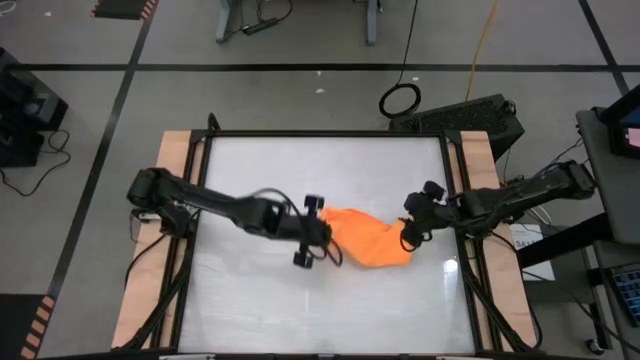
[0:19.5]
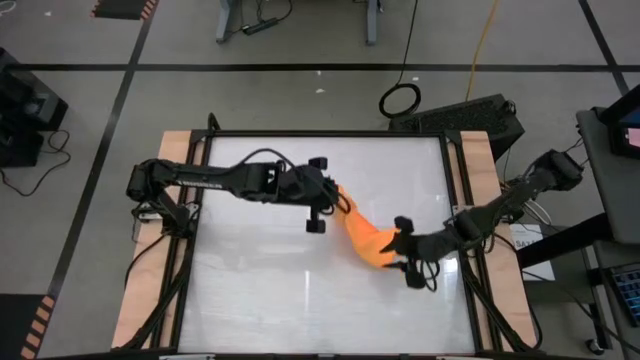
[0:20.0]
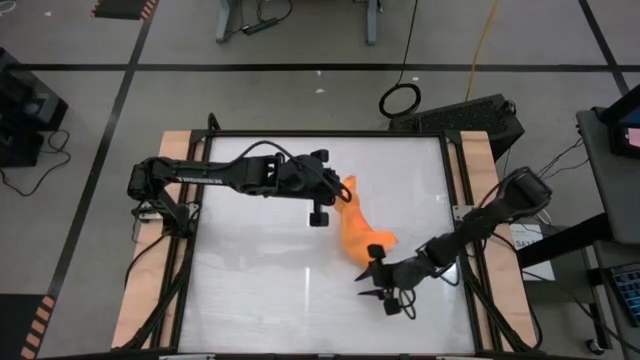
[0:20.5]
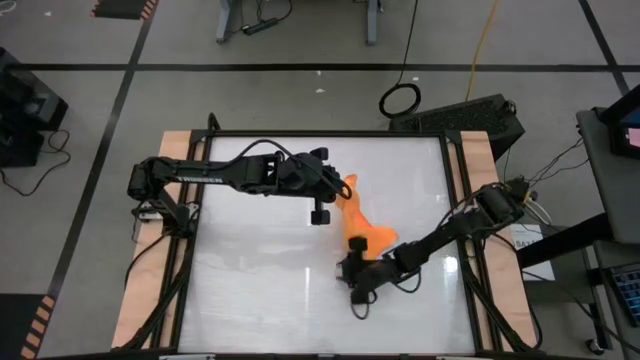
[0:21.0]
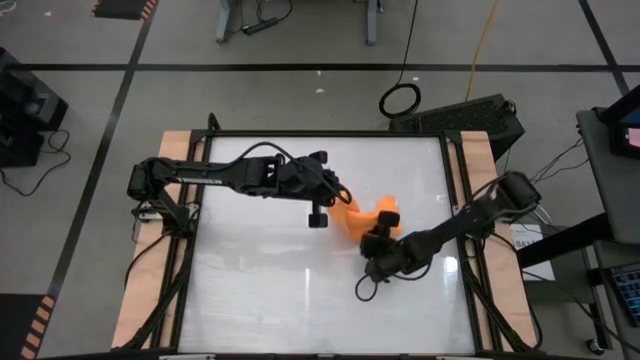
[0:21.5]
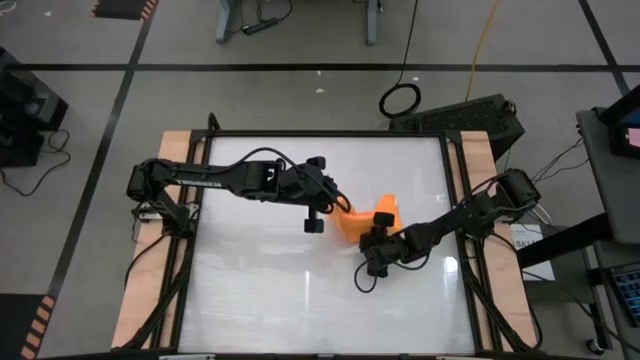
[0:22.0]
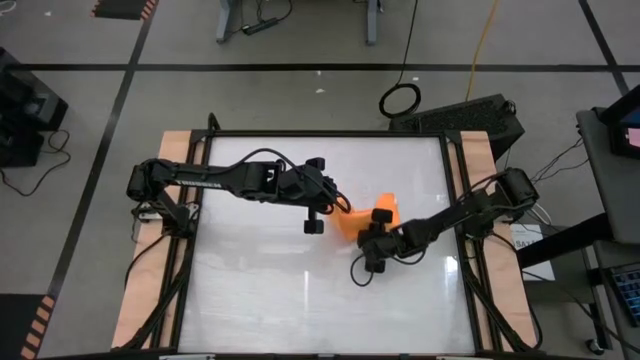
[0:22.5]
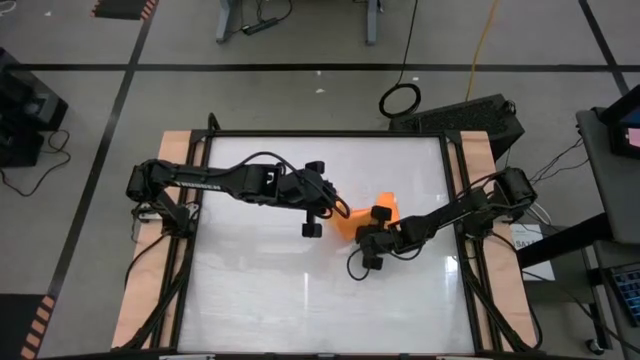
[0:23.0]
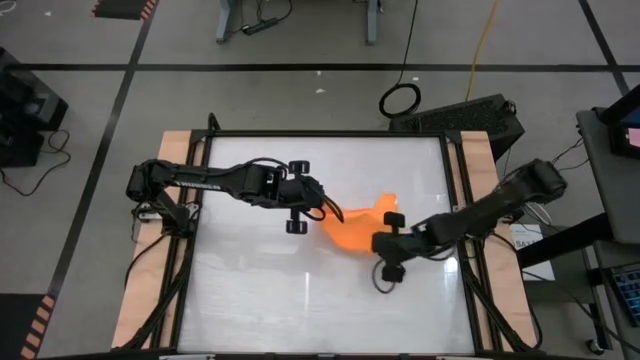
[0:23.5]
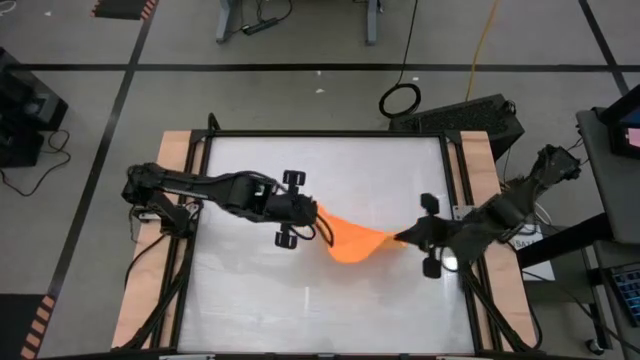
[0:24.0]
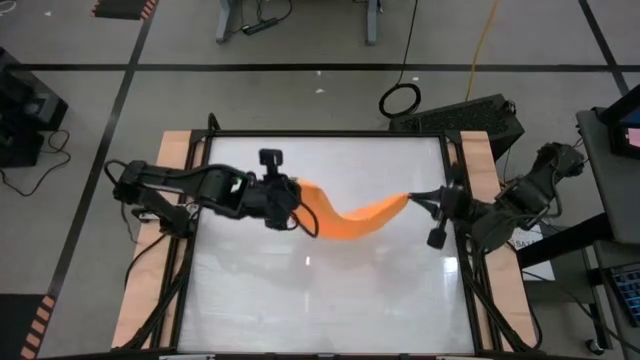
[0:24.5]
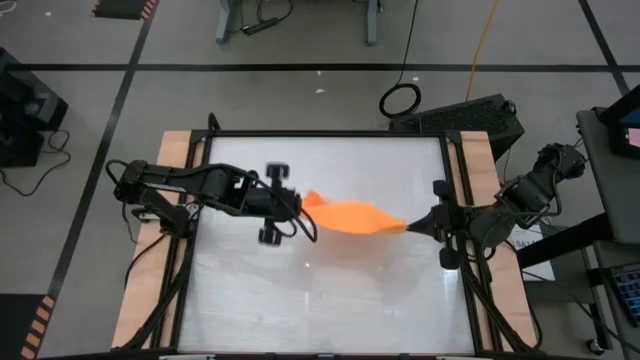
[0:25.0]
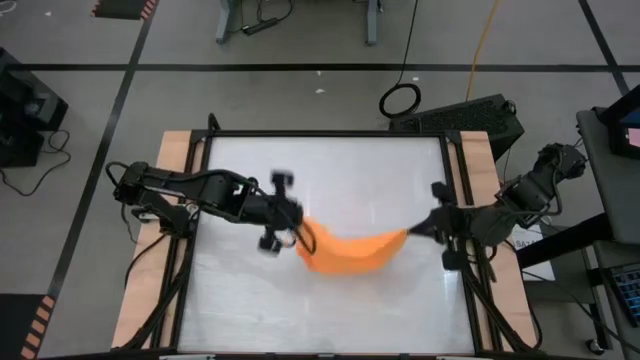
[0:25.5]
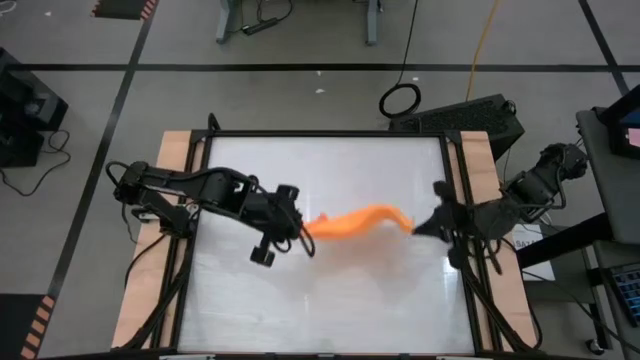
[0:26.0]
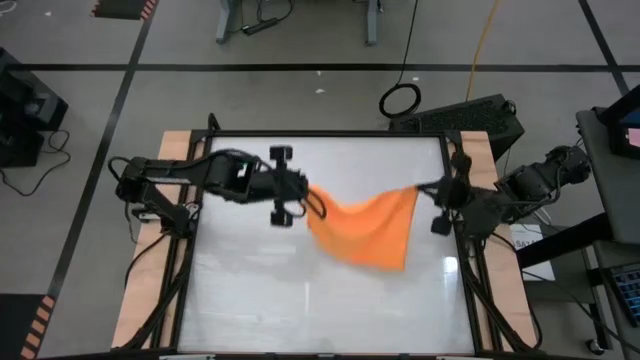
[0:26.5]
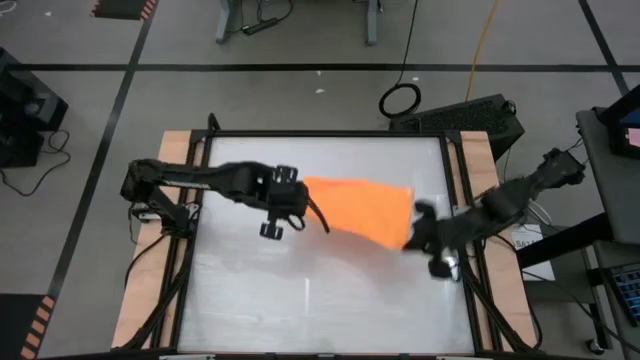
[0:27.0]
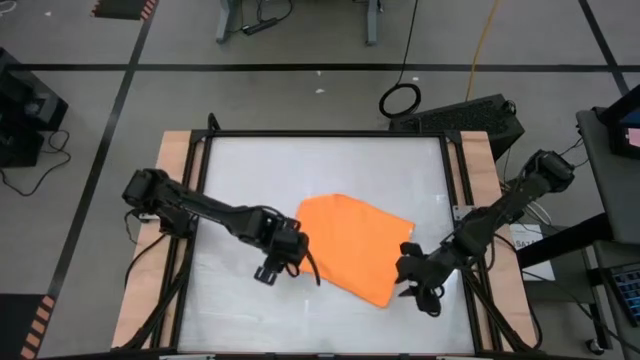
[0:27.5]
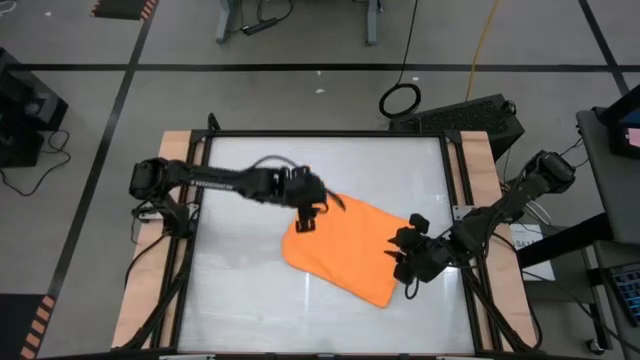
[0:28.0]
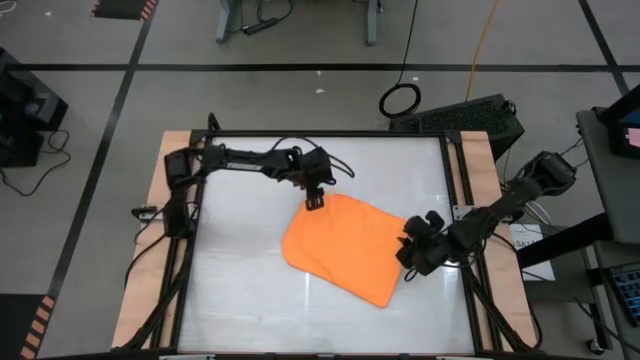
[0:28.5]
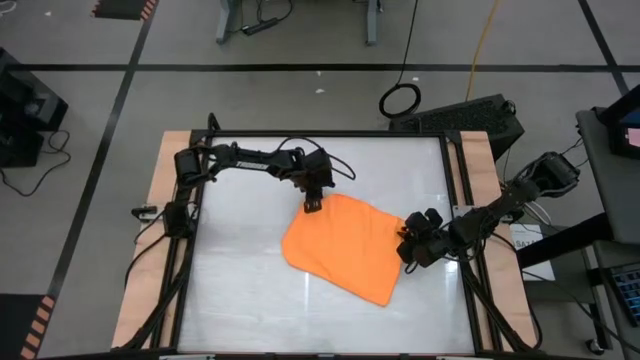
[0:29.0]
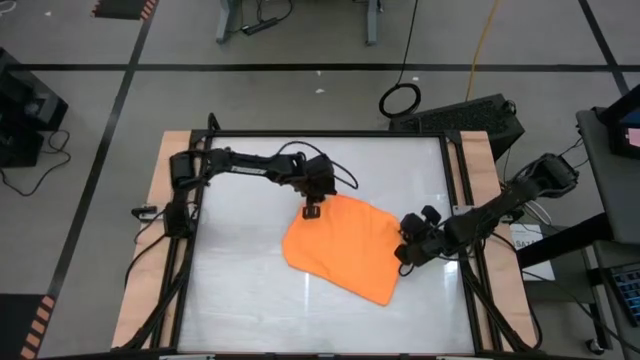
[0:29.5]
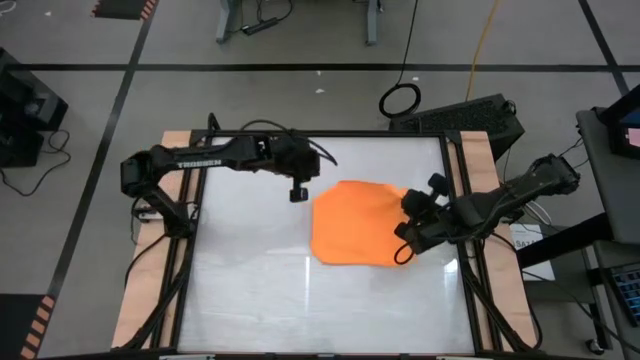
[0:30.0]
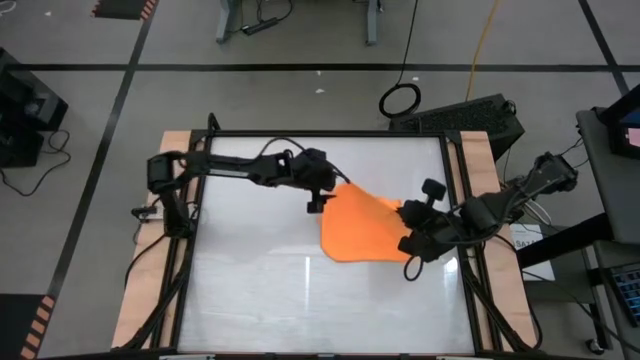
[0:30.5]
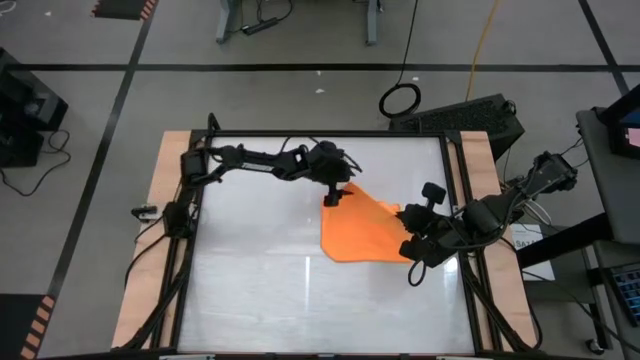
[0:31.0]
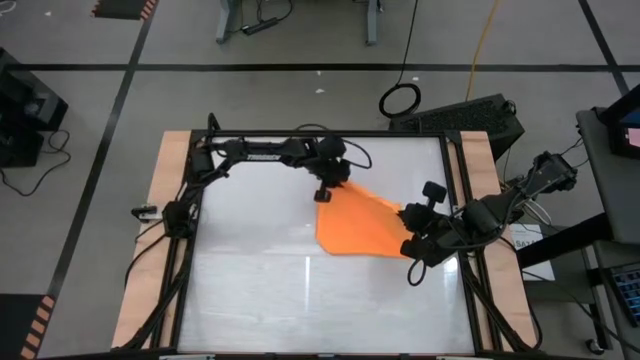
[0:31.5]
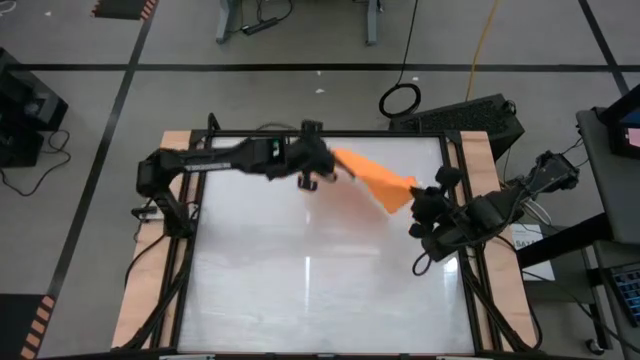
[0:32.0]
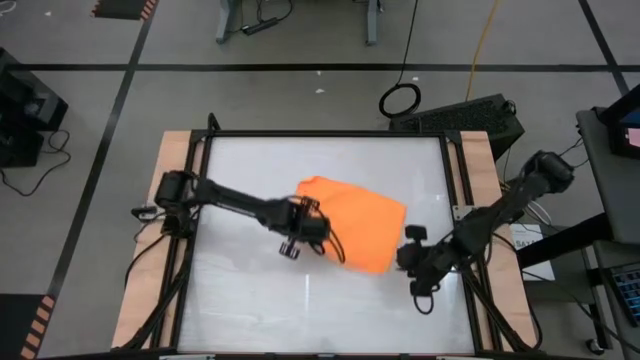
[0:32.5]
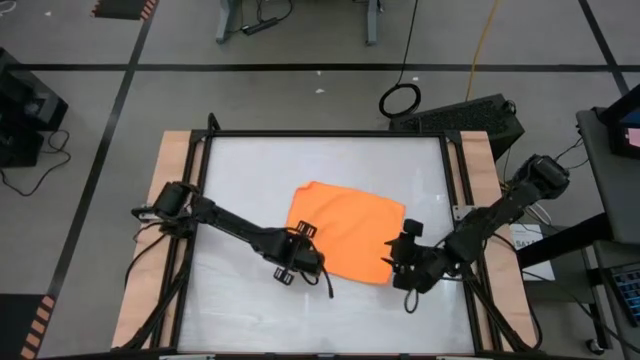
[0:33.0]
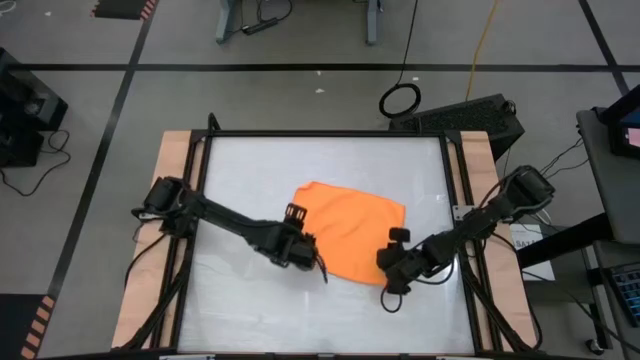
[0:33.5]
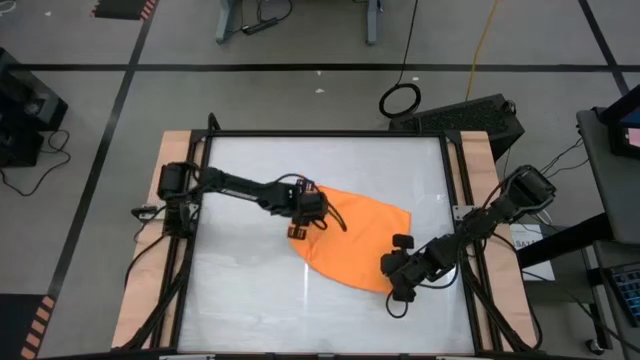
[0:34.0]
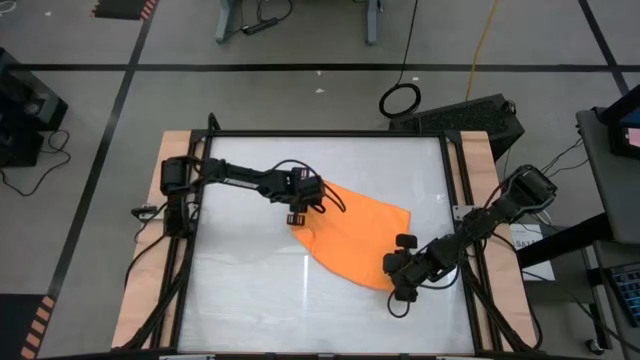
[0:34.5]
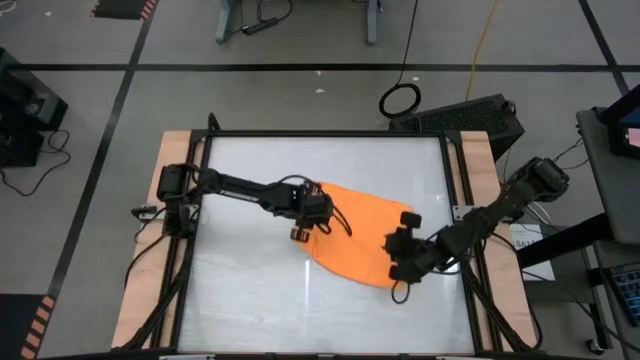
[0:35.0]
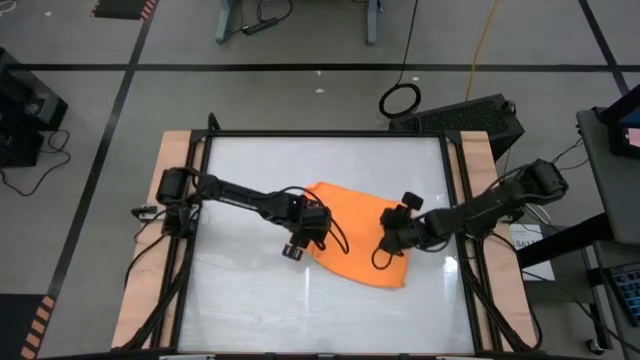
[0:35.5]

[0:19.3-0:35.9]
Task: Roll towel
Fold the towel

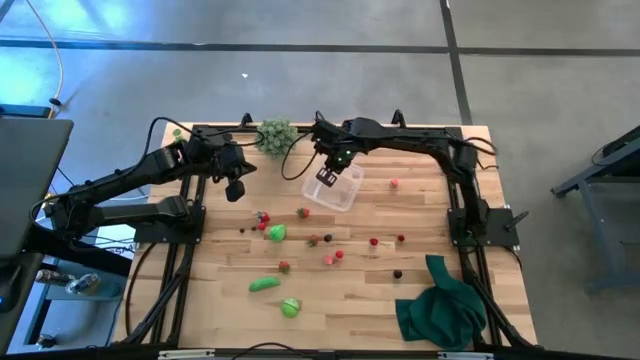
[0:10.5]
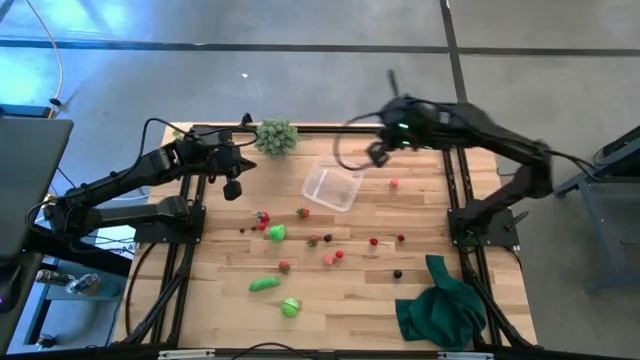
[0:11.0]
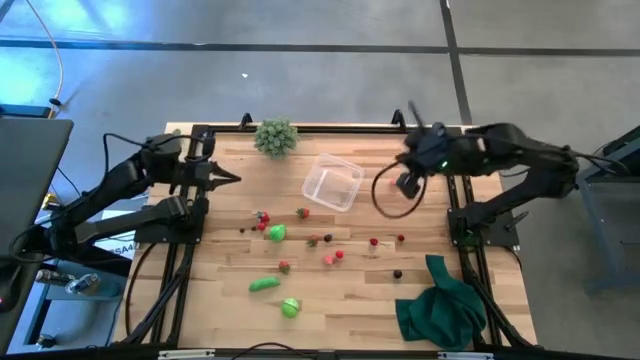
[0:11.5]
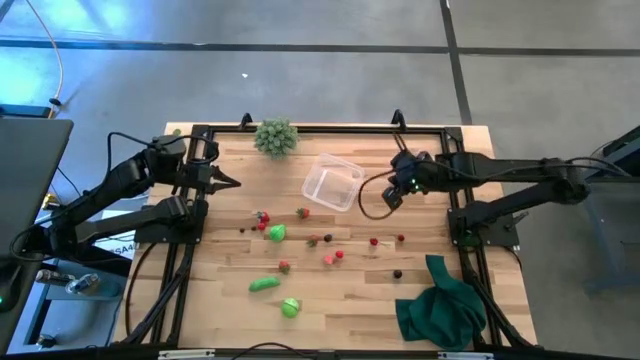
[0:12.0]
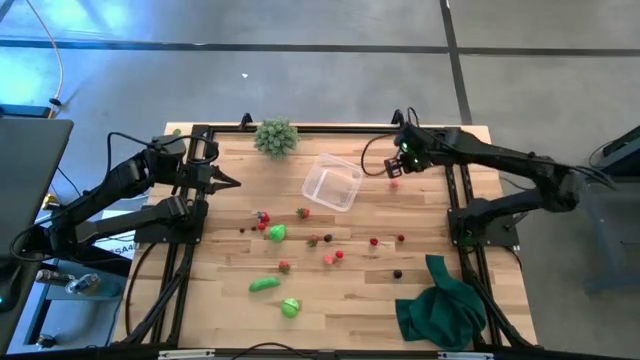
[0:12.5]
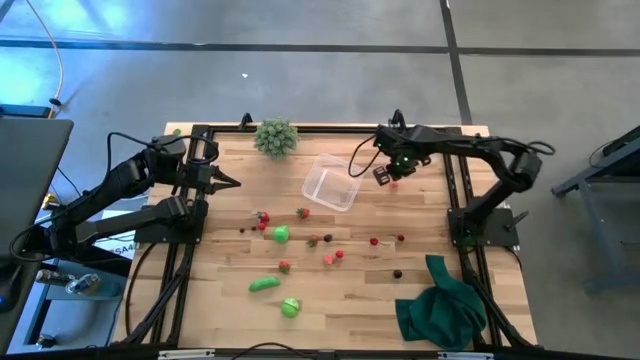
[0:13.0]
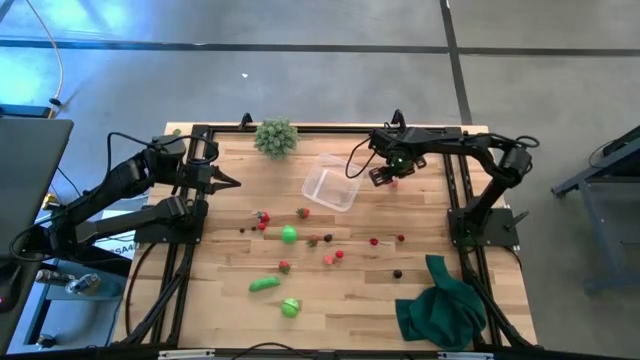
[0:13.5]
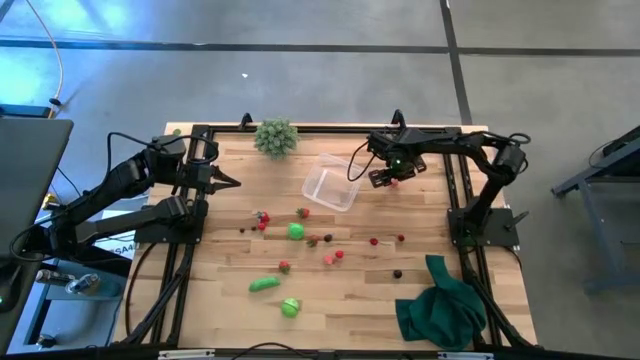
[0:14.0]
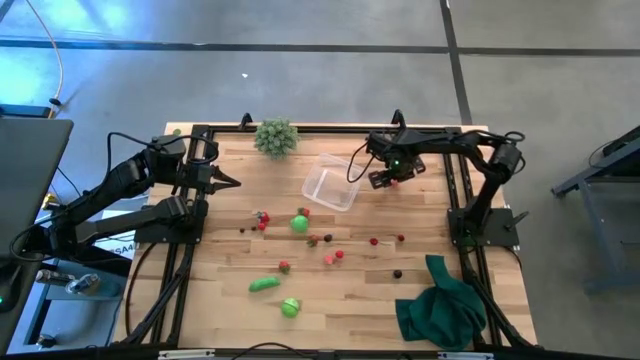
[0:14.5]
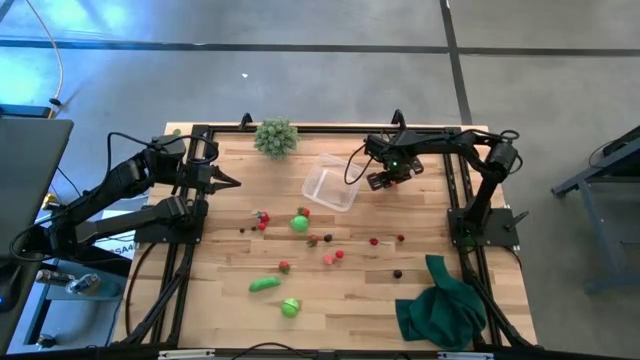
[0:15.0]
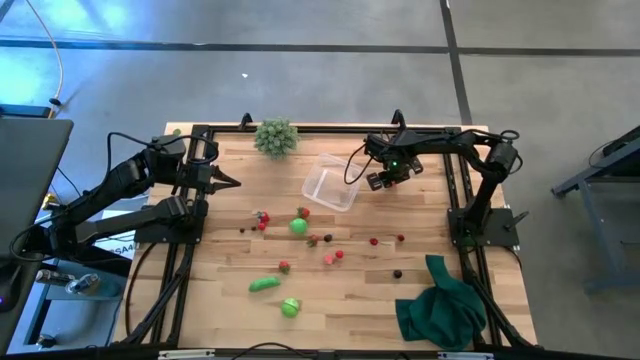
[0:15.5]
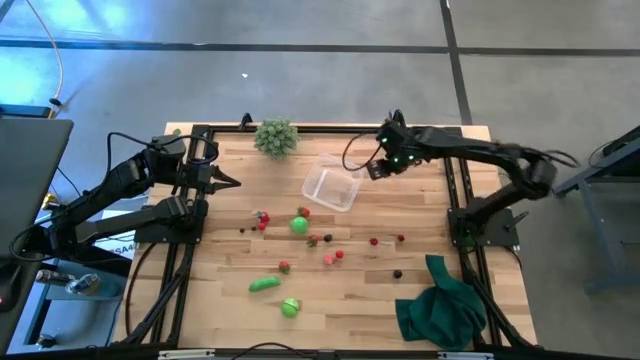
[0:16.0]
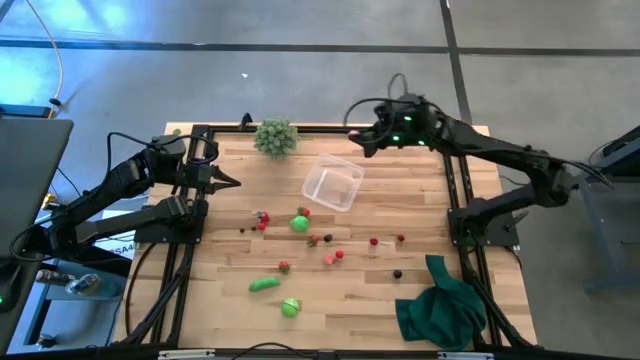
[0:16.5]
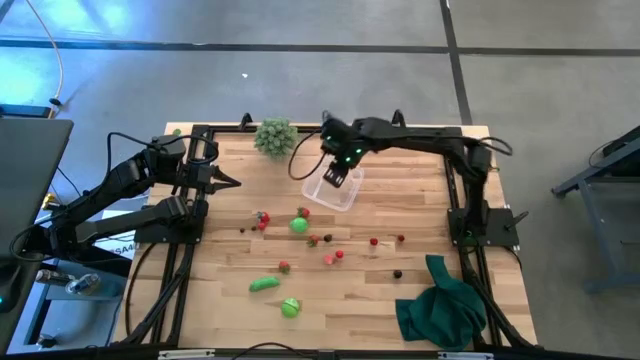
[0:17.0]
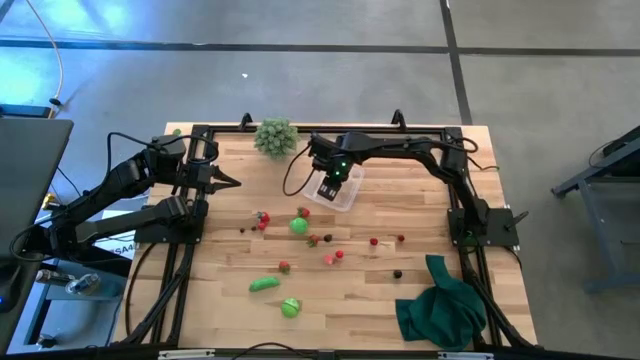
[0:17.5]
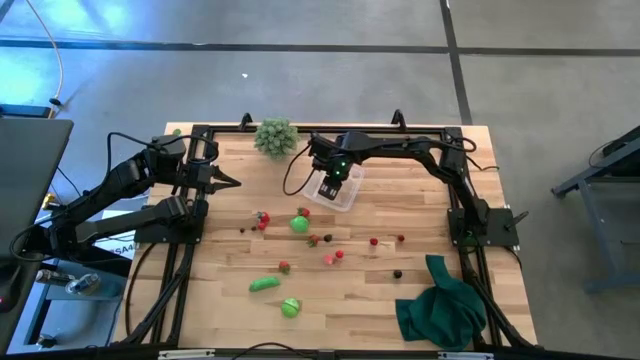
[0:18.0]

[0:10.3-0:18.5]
Task: Pick and placing Produce into tupperware
Put the peach into the transparent container
